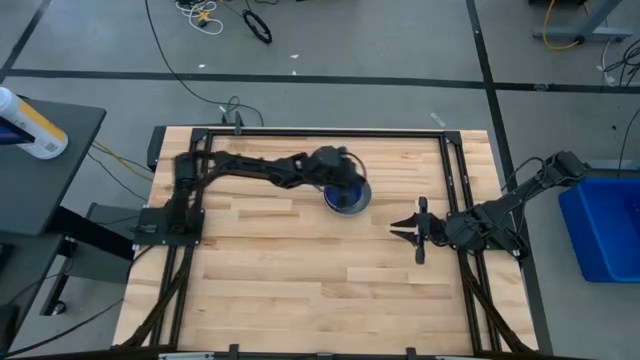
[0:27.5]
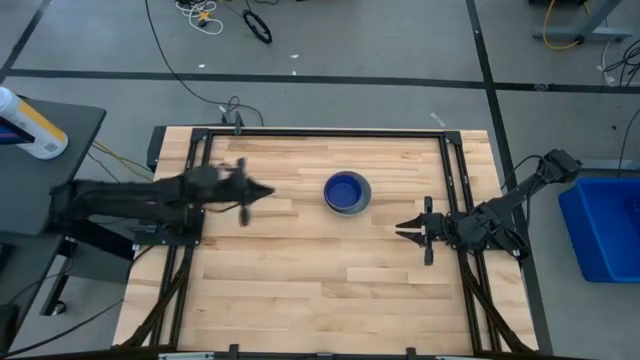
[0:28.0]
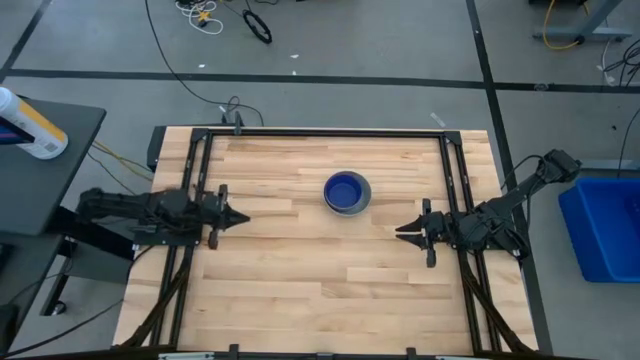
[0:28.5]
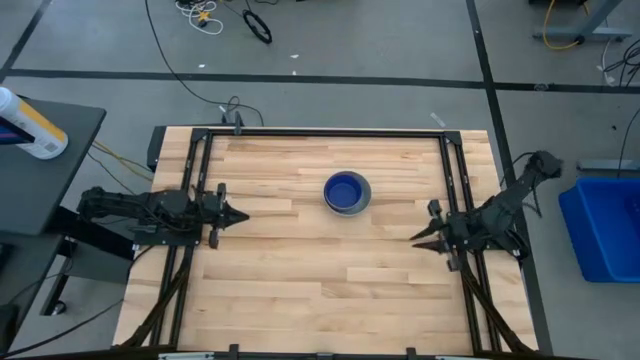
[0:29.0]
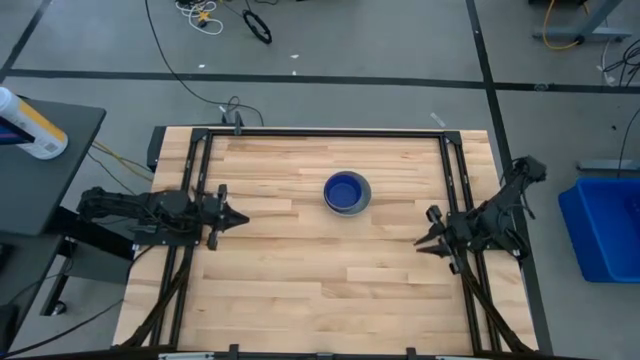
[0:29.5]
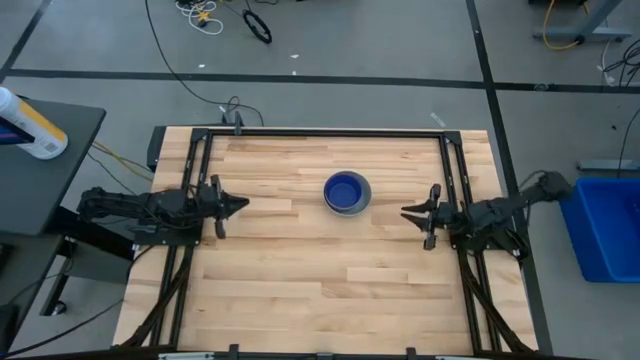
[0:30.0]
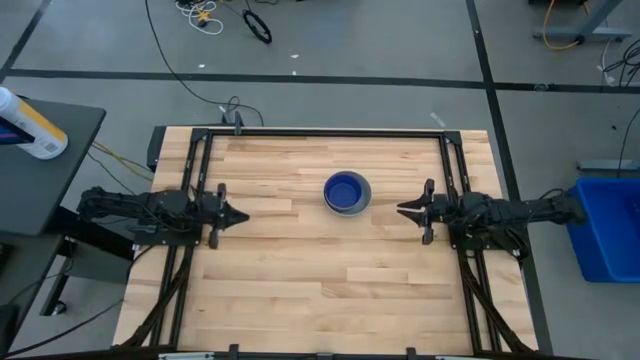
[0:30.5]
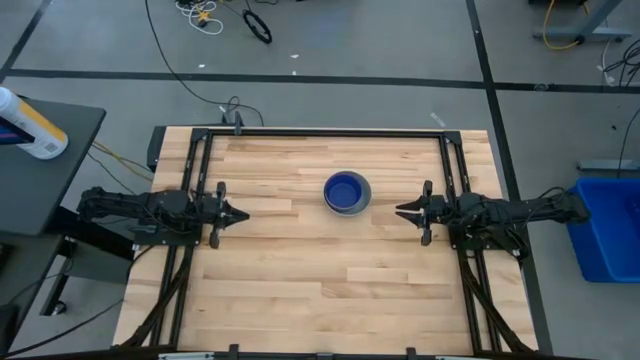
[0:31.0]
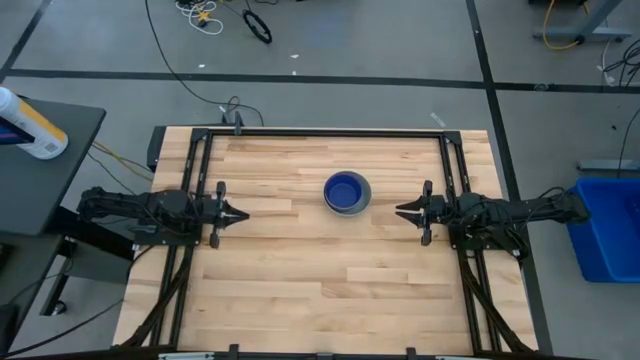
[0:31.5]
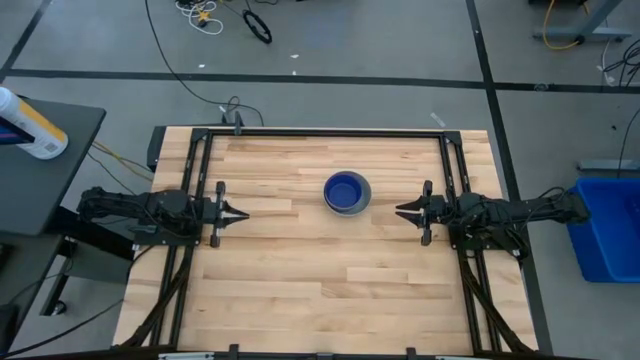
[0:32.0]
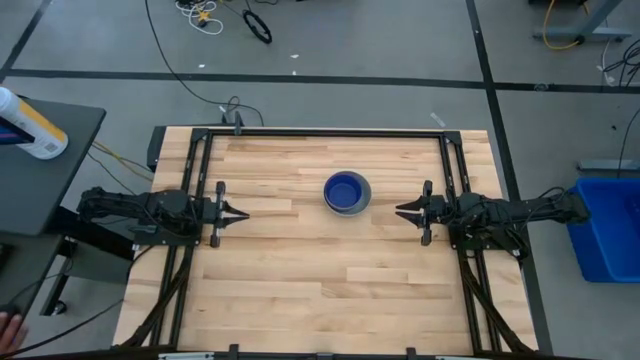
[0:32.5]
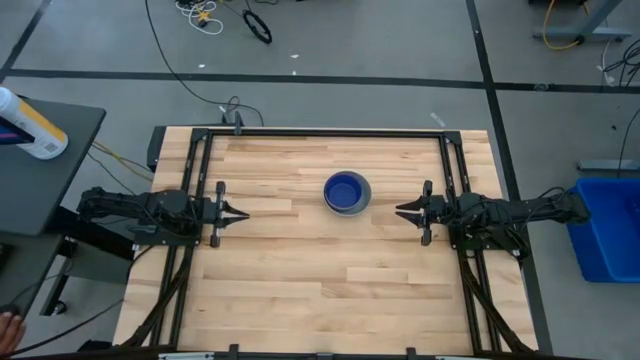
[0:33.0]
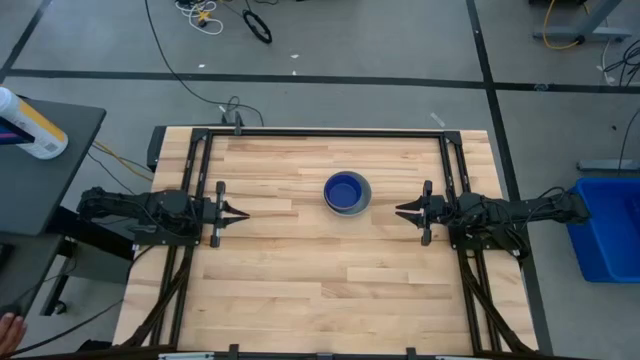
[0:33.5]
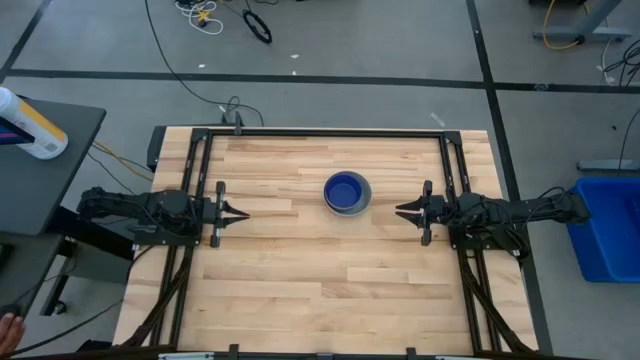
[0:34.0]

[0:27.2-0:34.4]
Return to Home Position

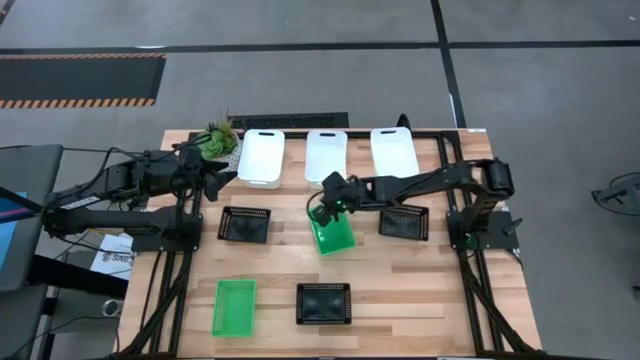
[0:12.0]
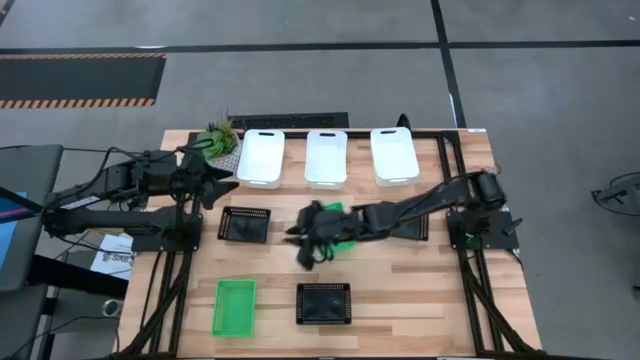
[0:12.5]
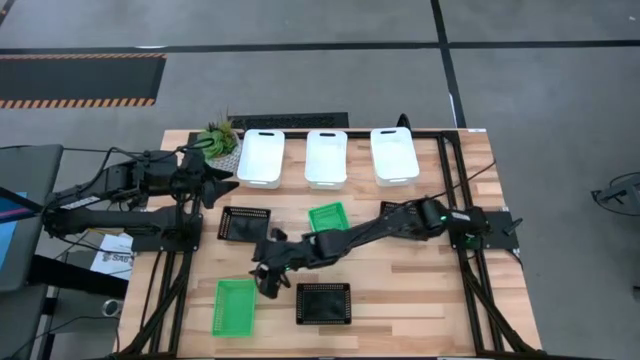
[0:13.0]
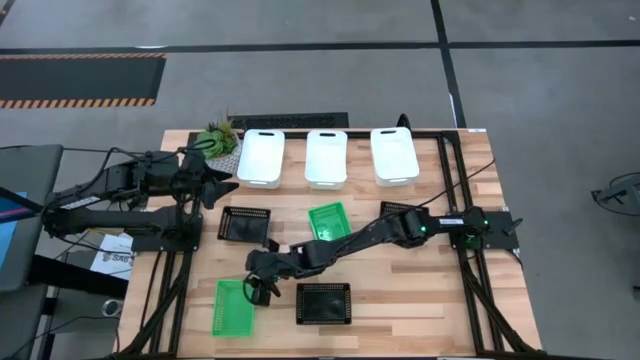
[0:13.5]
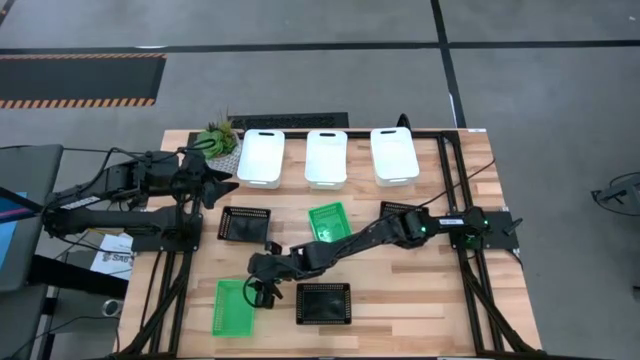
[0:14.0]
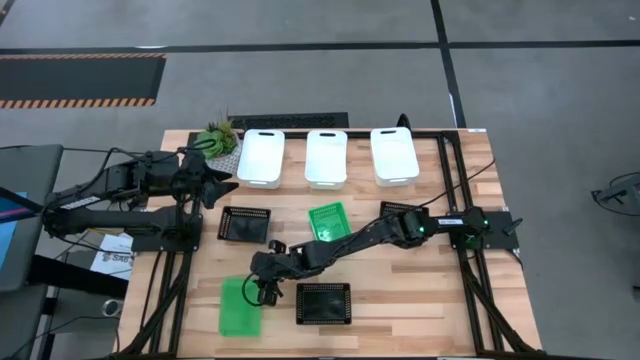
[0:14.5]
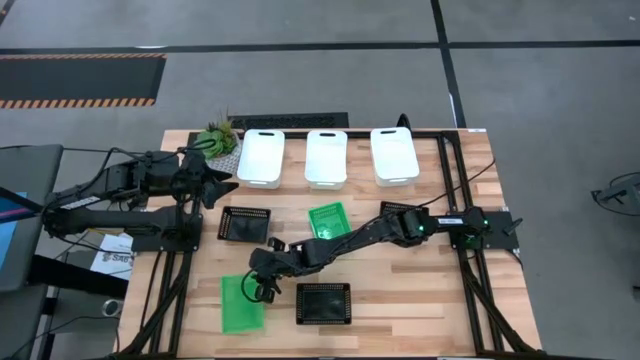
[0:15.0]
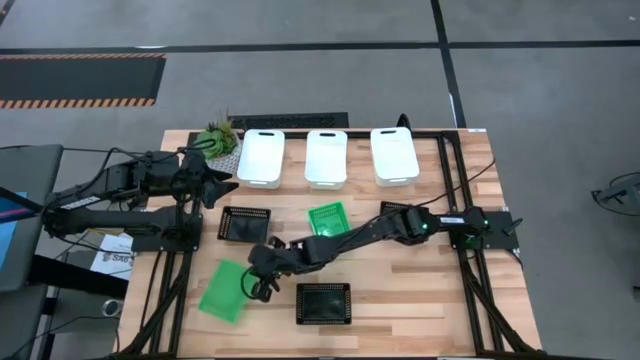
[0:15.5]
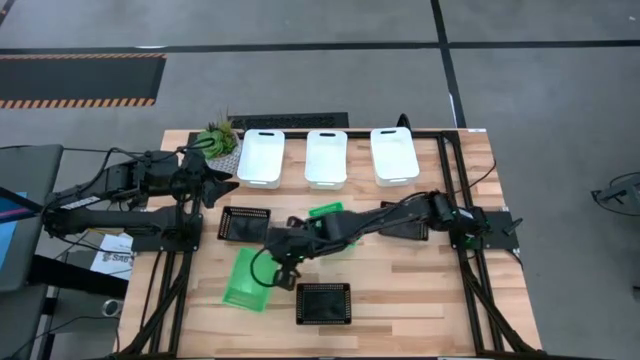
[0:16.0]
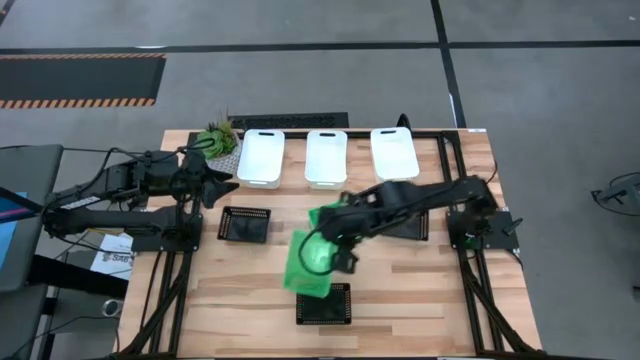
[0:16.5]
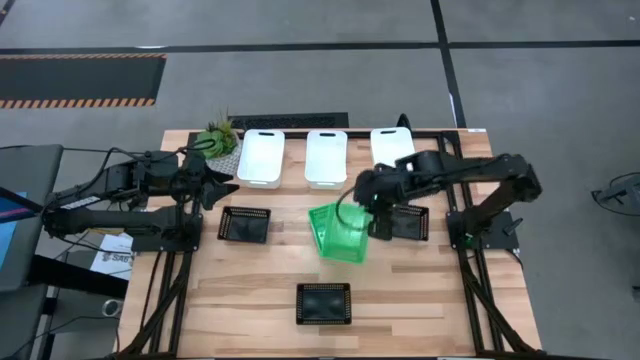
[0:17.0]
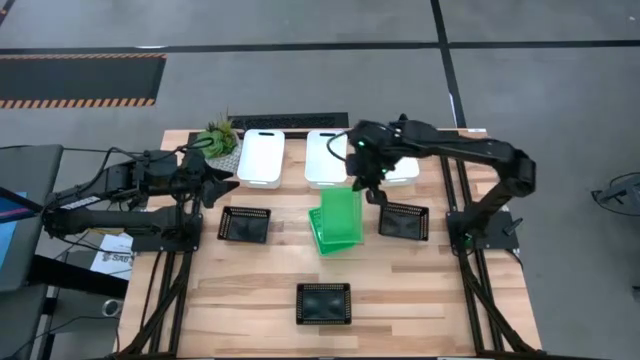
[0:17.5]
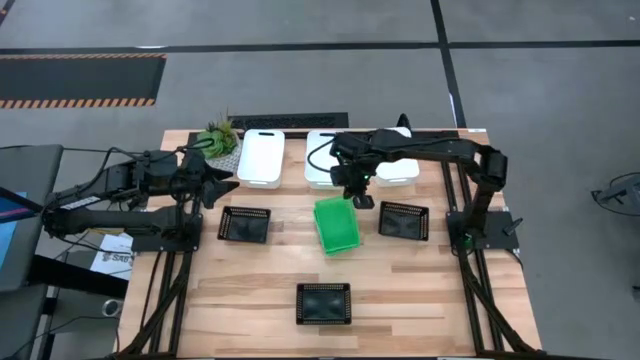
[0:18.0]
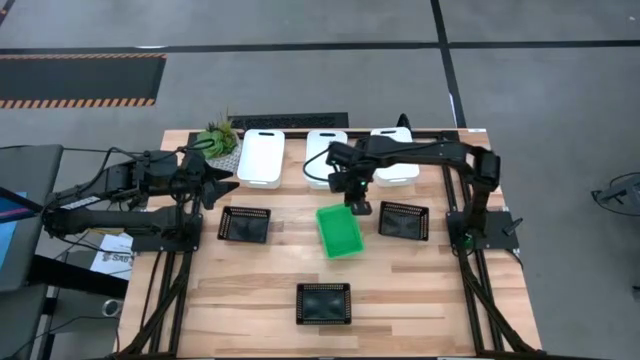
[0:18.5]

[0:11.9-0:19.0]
Stack the bottom green bin on the top green bins

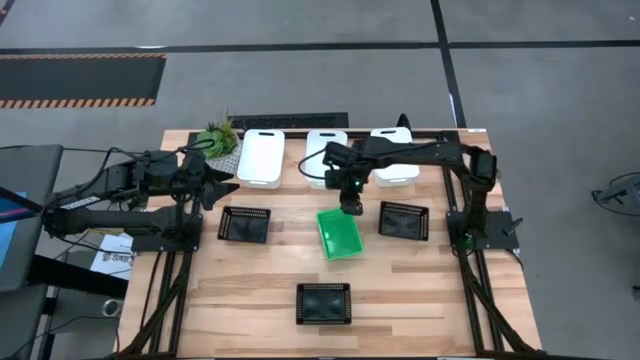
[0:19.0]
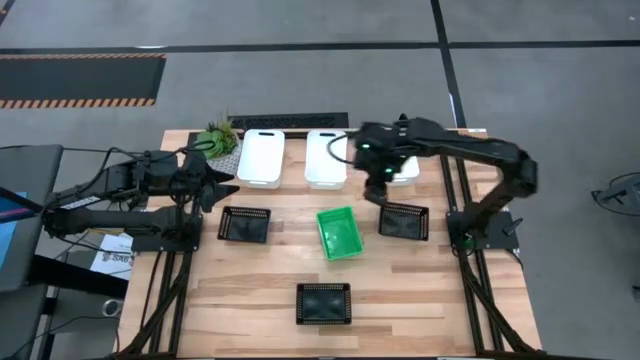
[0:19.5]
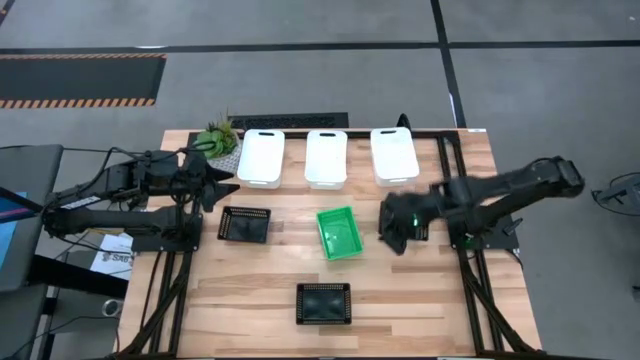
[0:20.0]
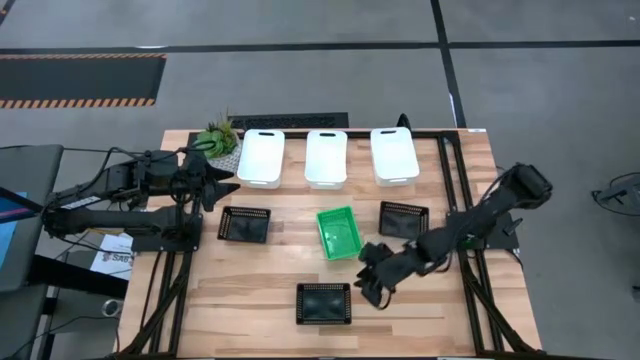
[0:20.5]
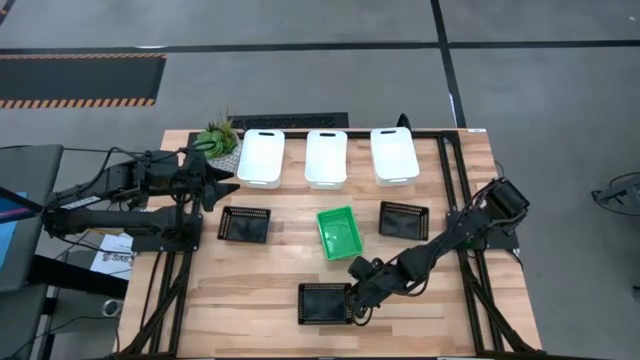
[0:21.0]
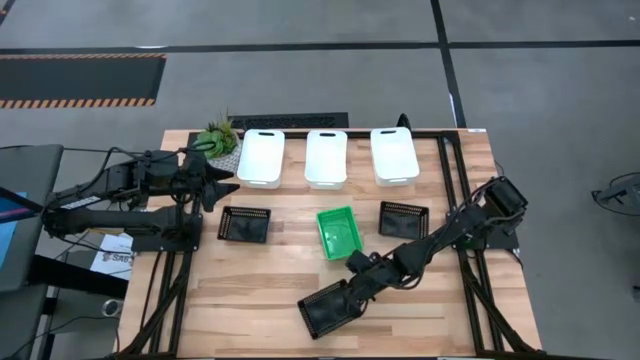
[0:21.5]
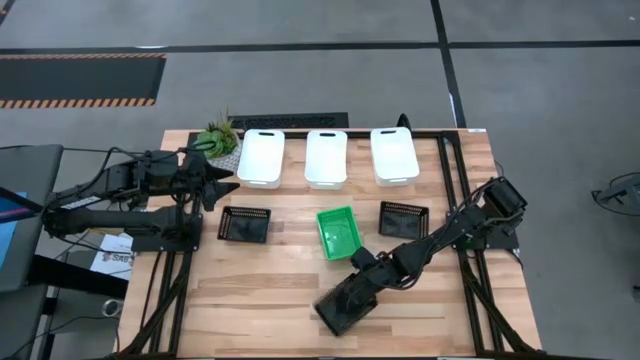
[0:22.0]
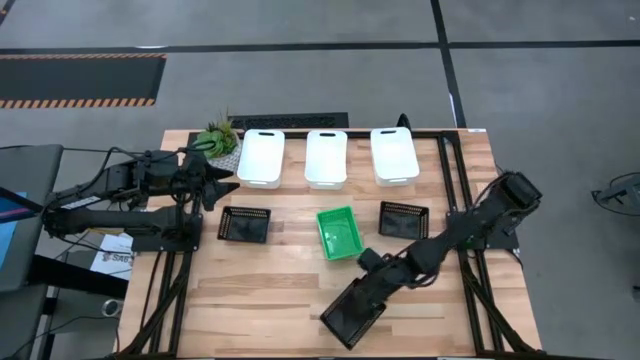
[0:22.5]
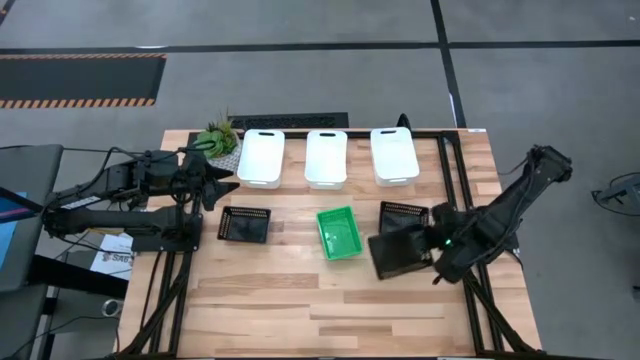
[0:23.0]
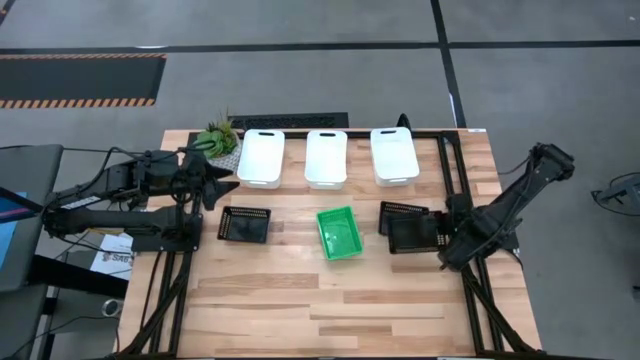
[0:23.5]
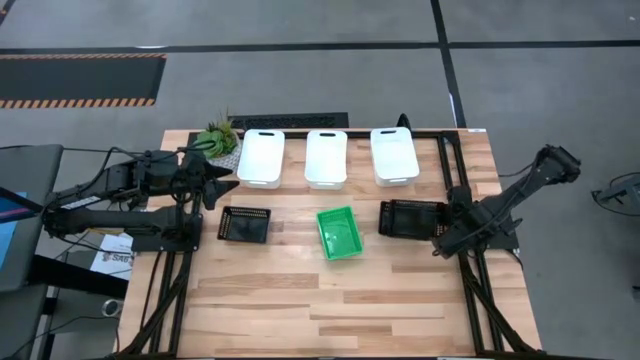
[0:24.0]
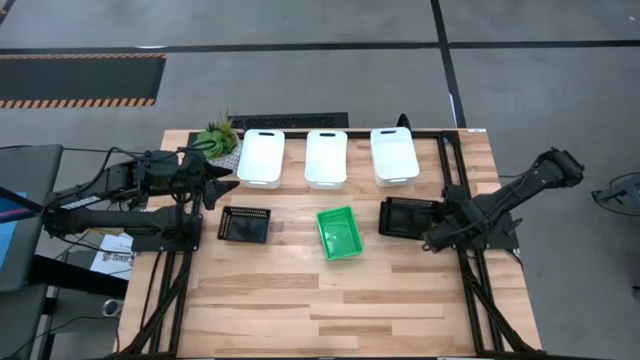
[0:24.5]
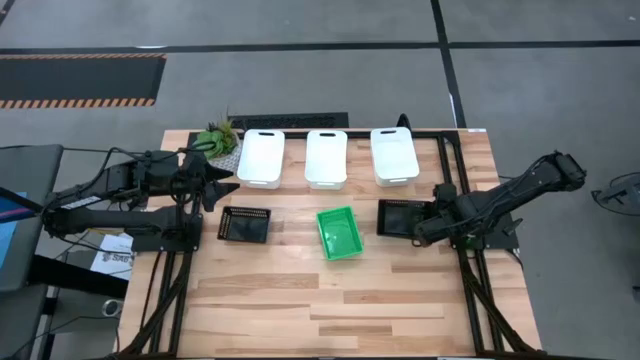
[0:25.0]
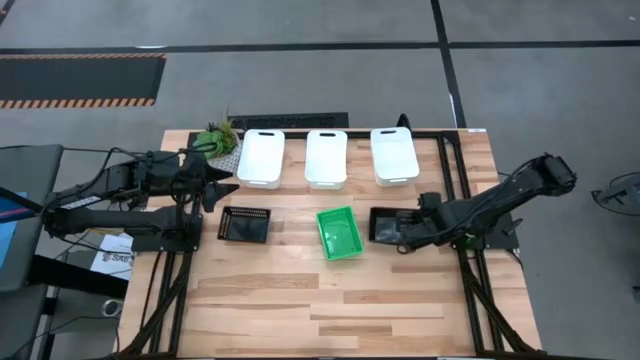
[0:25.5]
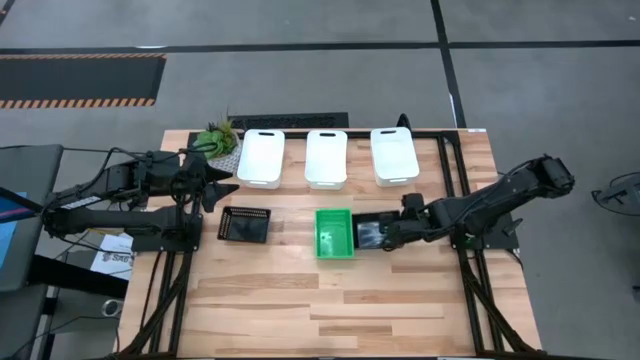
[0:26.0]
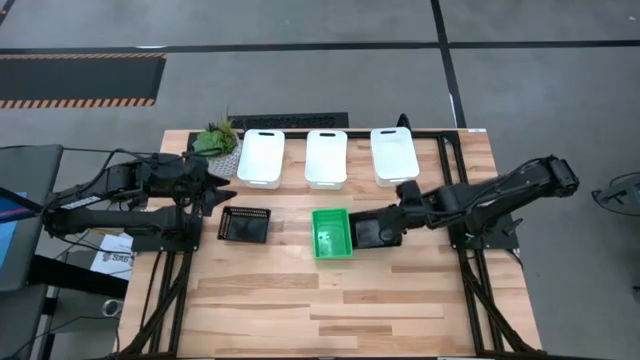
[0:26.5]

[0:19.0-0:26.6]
Stack the bottom black bin on the top right black bin
